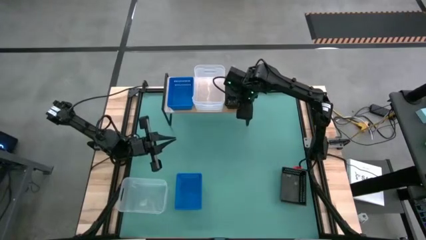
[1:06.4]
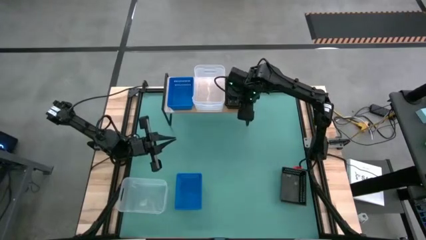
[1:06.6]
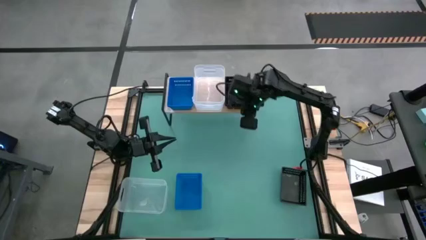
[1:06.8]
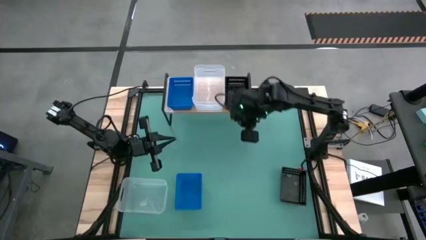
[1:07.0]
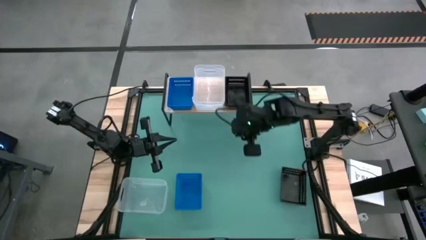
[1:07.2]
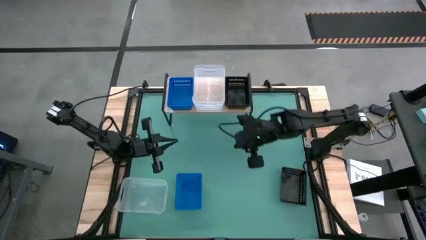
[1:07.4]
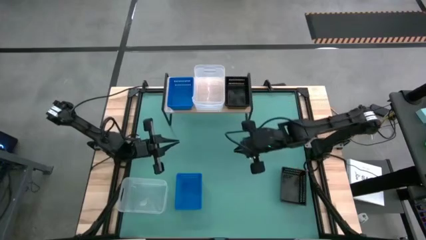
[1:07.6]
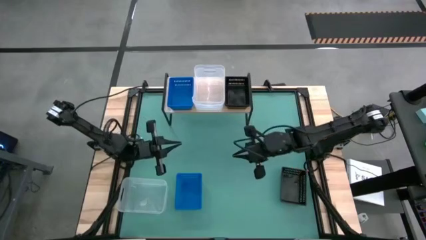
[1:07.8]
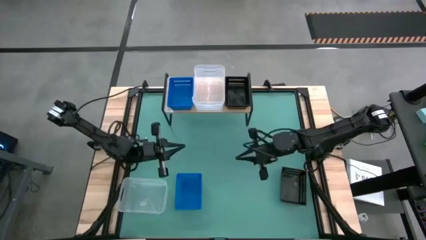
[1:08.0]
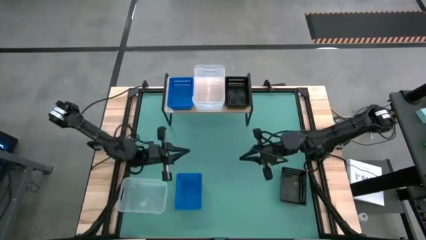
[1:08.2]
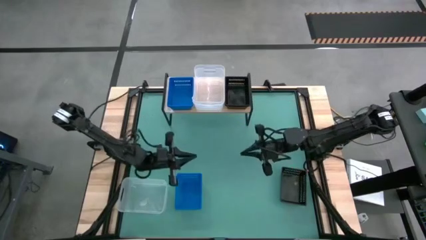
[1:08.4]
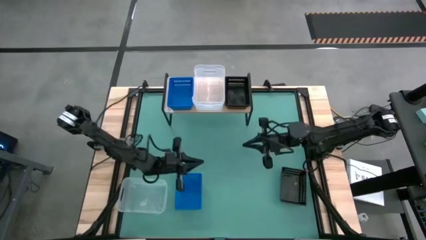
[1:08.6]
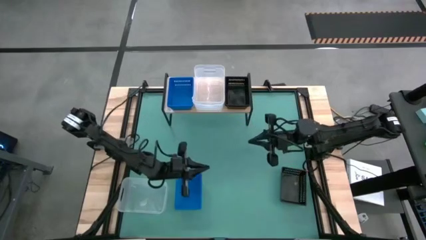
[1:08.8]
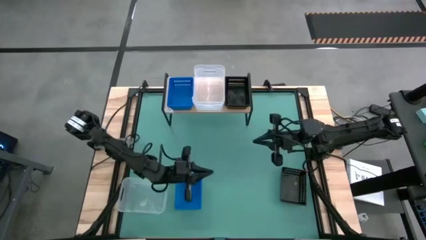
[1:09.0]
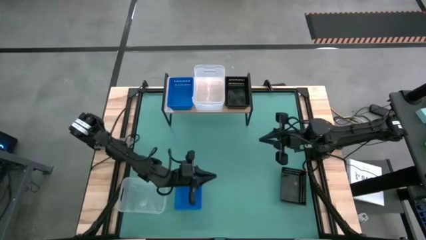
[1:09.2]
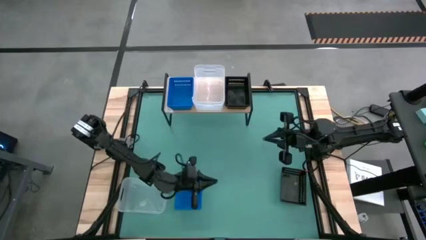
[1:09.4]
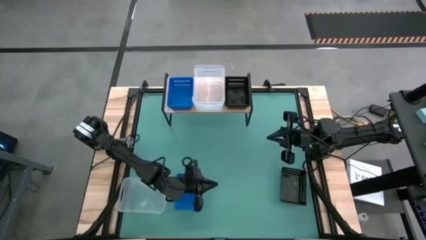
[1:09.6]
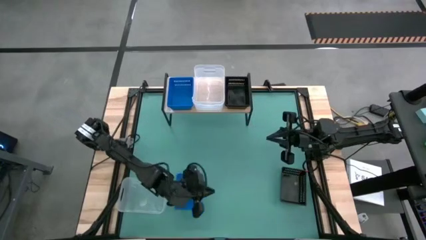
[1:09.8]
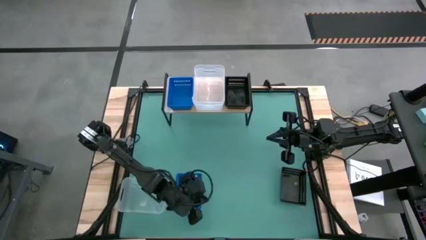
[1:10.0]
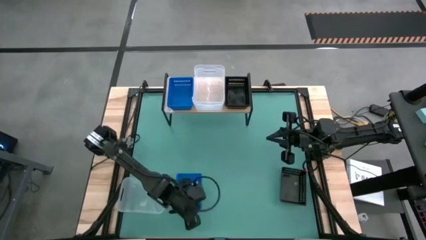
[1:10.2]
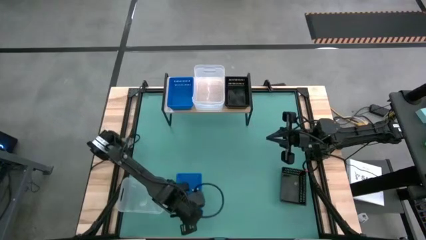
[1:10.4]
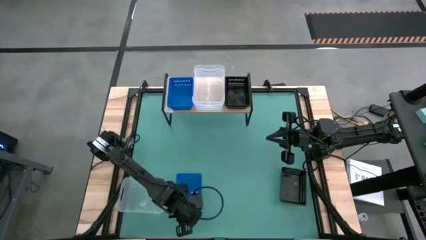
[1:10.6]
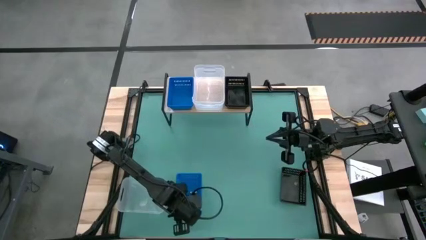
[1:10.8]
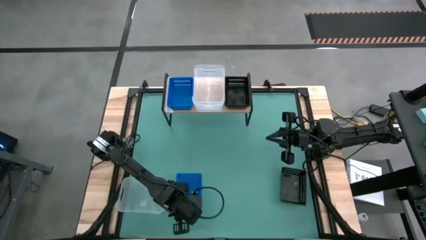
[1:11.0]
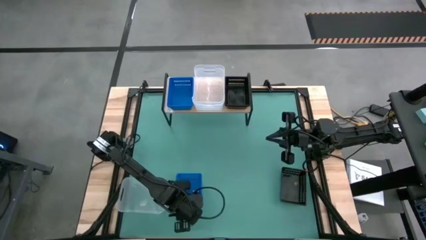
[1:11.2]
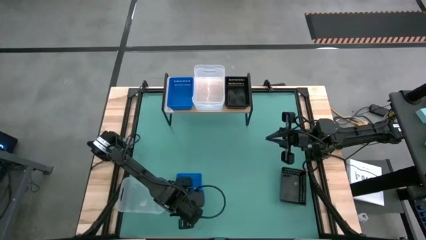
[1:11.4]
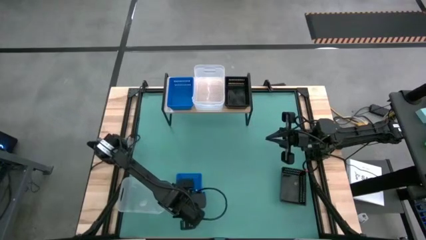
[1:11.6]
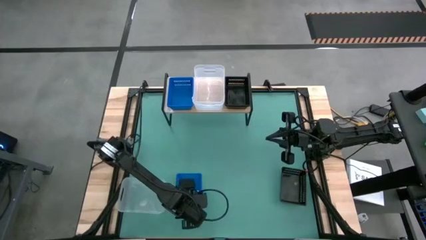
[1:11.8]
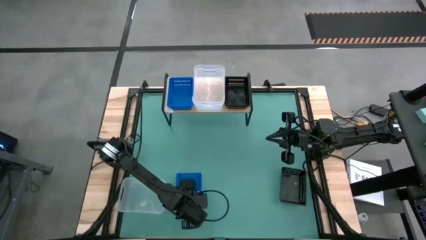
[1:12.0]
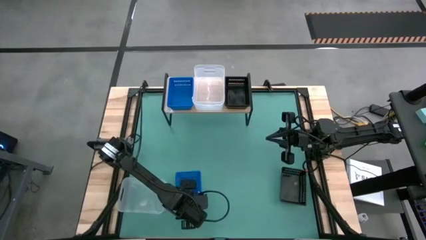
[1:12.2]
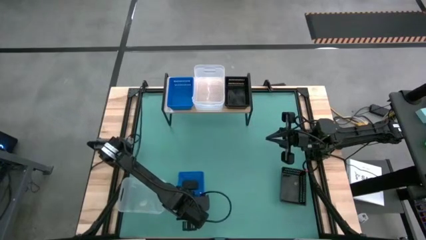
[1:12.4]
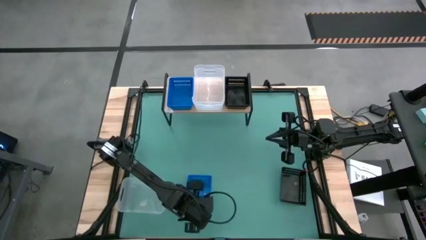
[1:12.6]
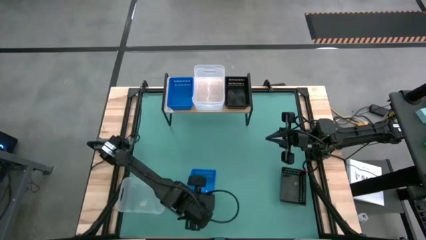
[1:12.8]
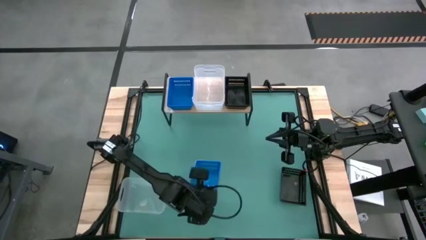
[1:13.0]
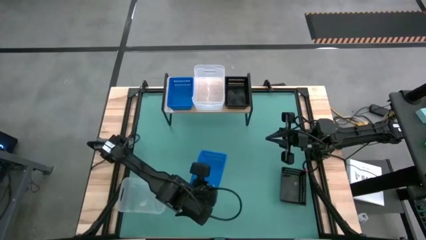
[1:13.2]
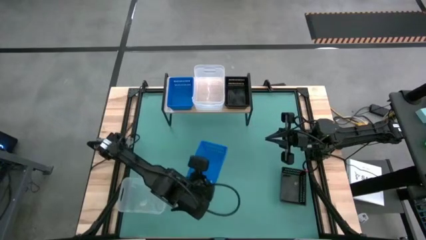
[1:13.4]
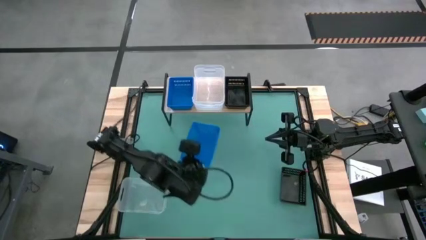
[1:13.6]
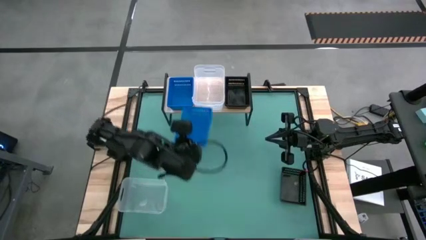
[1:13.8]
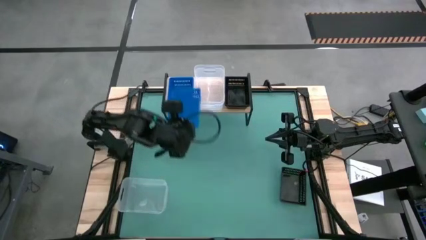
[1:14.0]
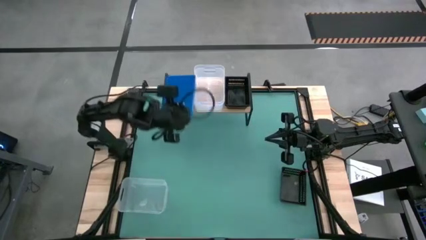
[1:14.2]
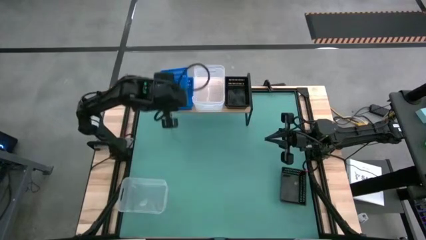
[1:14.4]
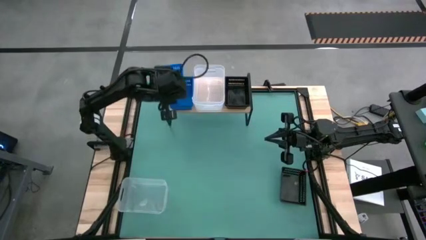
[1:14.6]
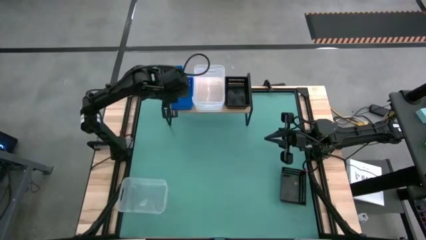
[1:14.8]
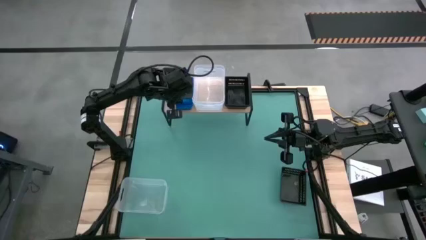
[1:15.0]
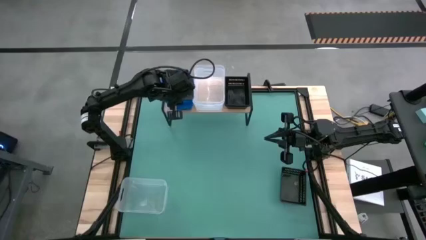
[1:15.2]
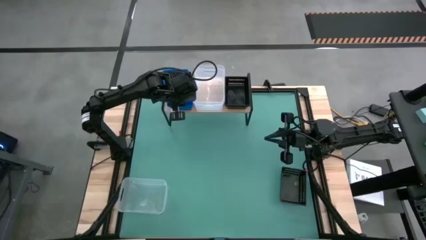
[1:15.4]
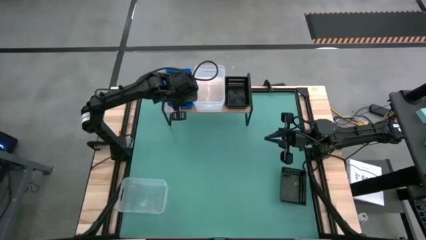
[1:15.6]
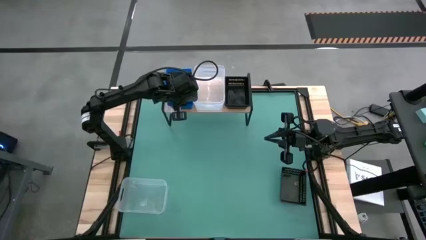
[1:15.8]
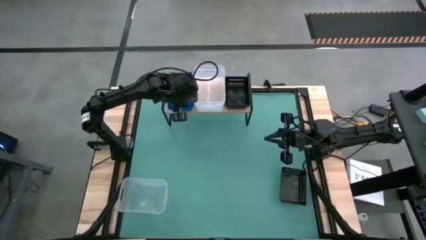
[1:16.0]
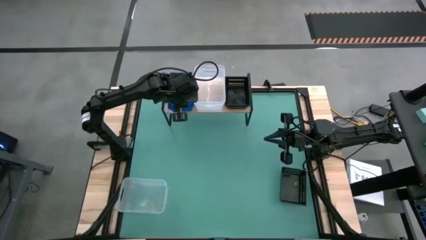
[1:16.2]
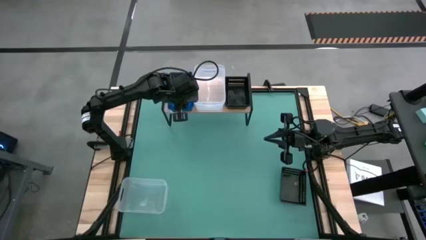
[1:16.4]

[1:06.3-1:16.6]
Task: Stack baskets on shelf by color
Stack the blue bin on the blue bins on the shelf

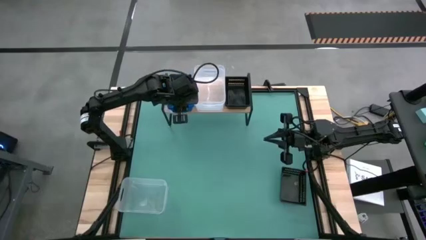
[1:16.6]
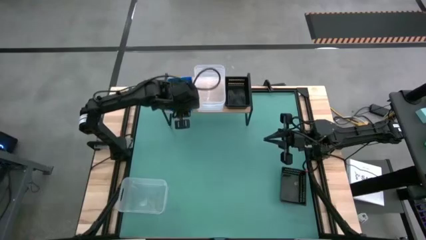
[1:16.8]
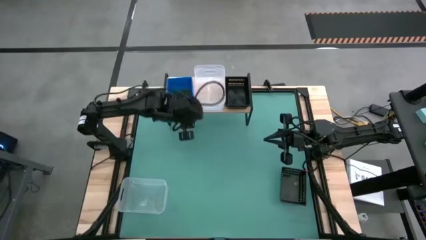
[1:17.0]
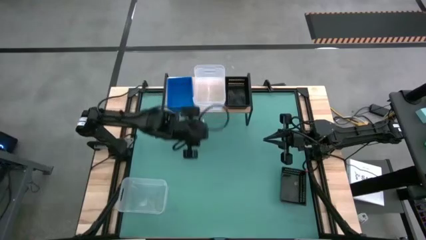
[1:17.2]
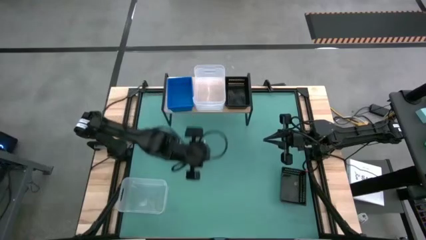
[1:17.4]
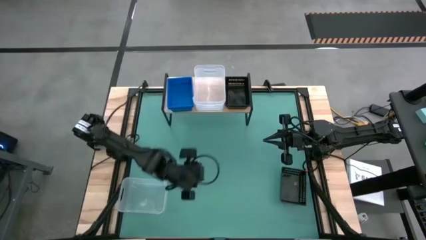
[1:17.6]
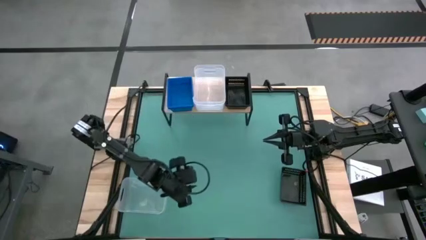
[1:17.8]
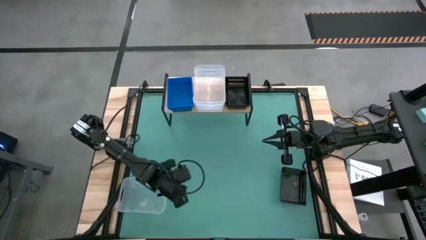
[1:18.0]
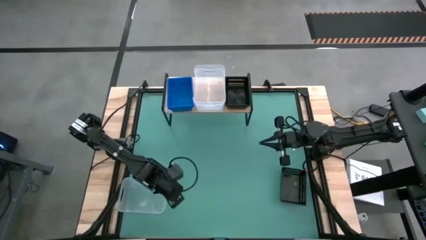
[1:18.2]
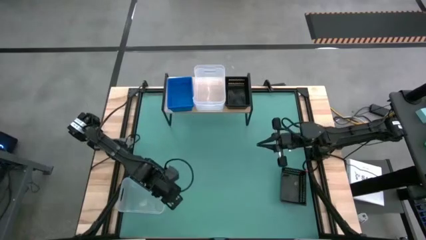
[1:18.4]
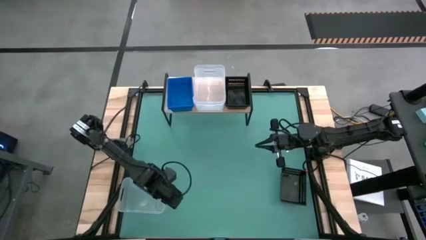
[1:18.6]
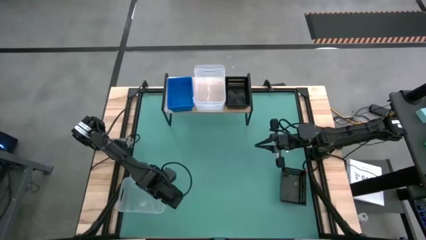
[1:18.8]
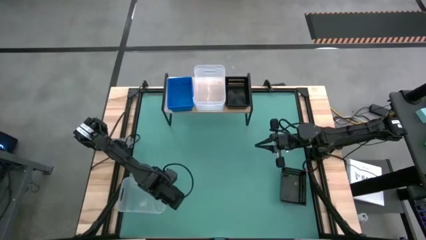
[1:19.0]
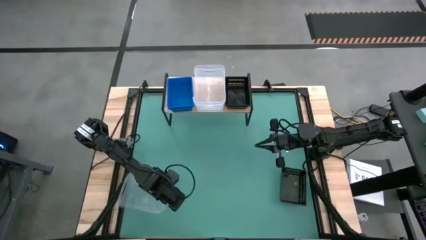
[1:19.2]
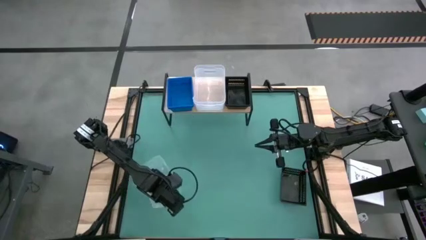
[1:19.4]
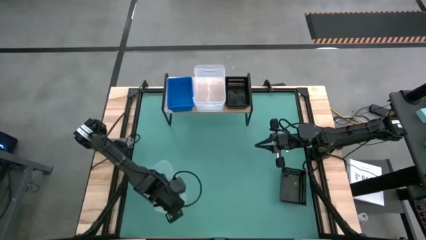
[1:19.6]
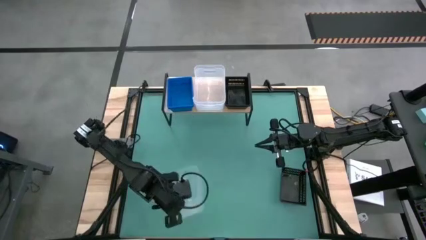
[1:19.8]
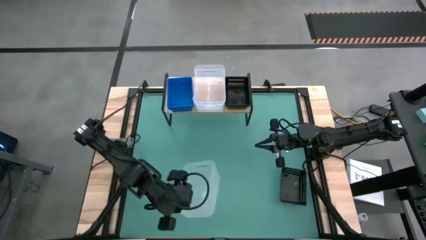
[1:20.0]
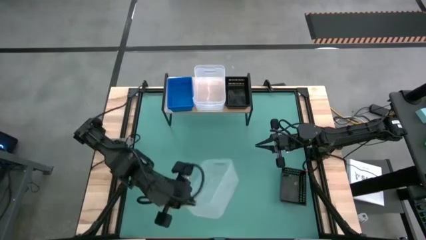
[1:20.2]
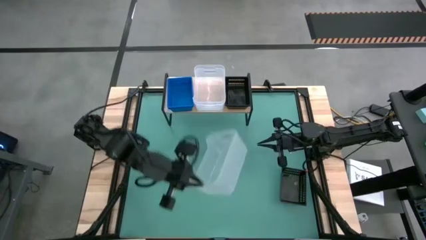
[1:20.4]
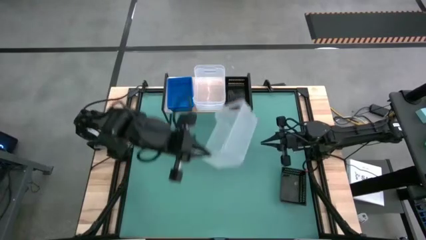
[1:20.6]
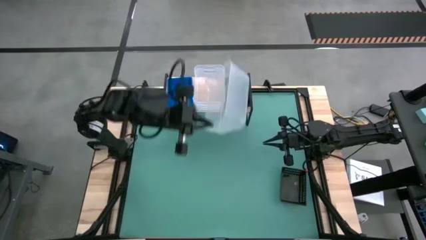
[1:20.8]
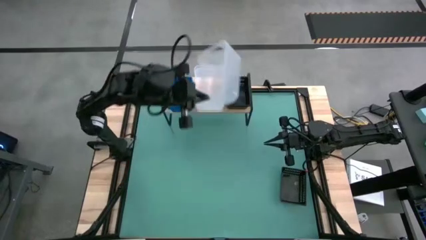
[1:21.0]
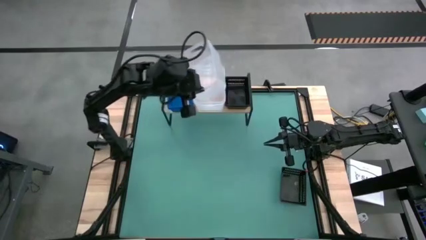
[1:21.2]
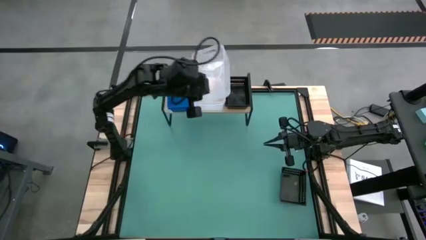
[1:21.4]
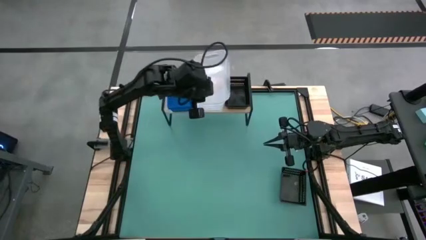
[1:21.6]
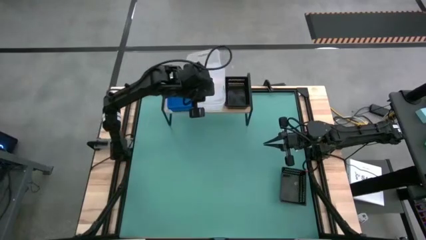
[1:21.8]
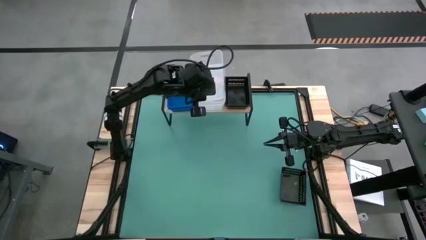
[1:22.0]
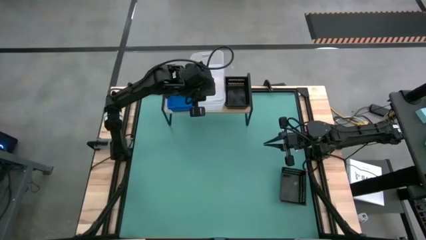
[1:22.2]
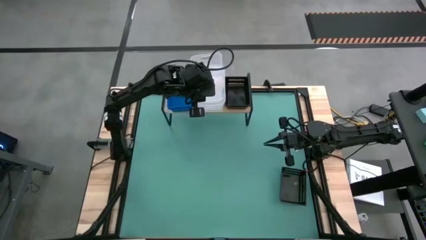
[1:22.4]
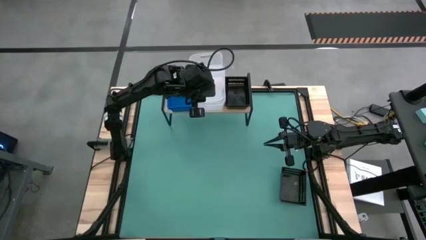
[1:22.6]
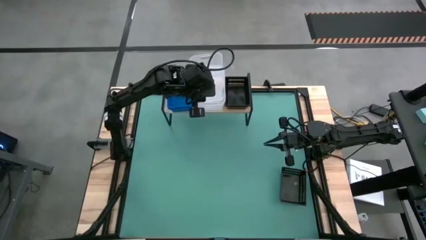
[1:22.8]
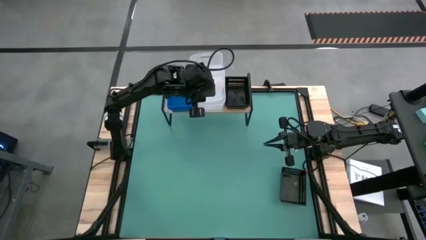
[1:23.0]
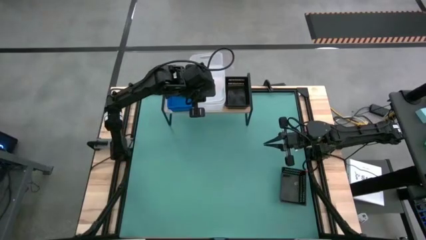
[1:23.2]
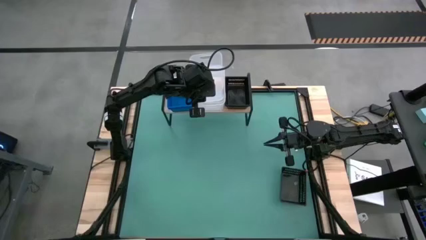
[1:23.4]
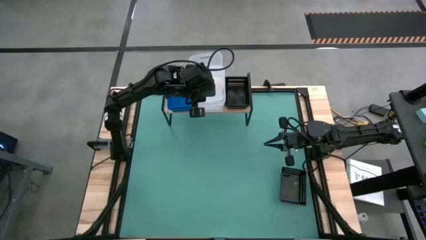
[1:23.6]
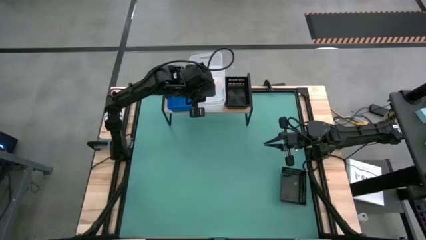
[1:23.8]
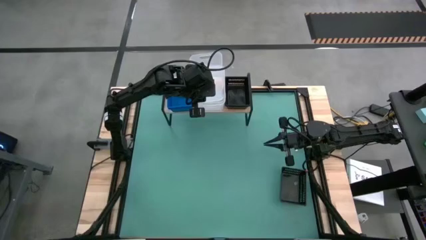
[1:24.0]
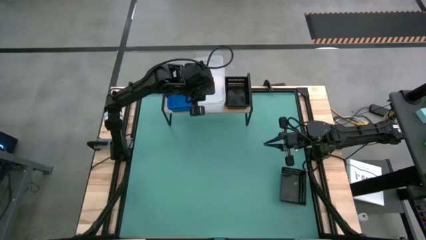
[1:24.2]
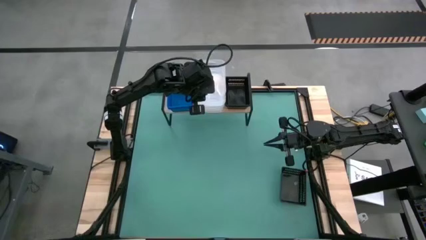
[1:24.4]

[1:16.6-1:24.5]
Stack the transparent bin on the transparent bins on the shelf
